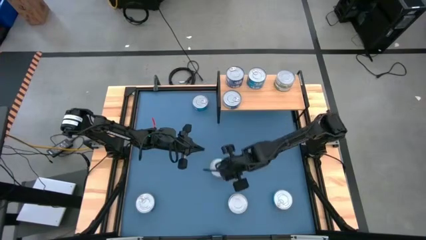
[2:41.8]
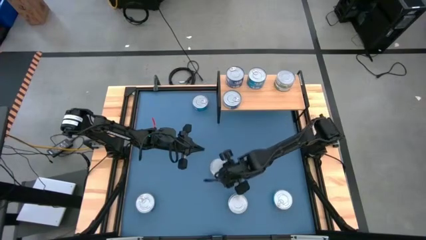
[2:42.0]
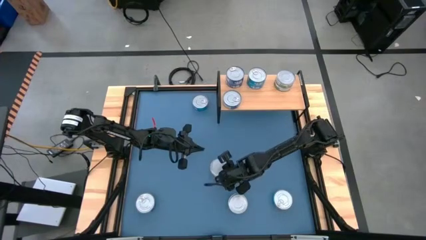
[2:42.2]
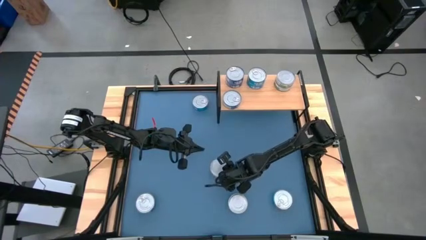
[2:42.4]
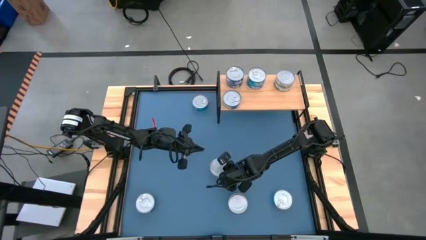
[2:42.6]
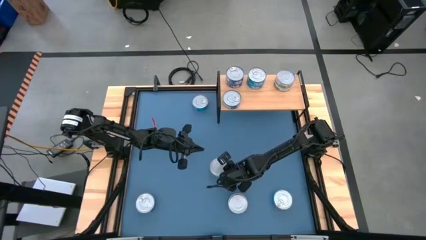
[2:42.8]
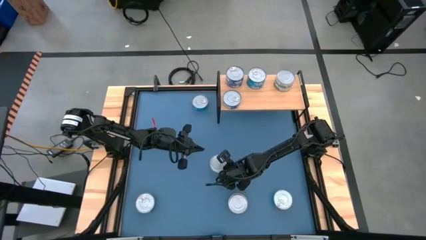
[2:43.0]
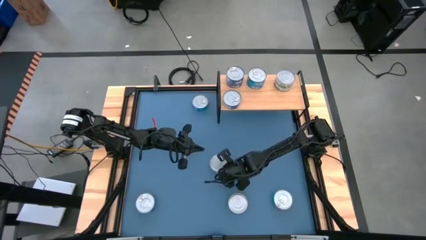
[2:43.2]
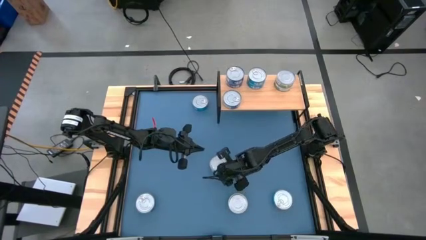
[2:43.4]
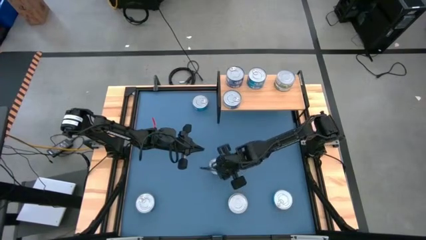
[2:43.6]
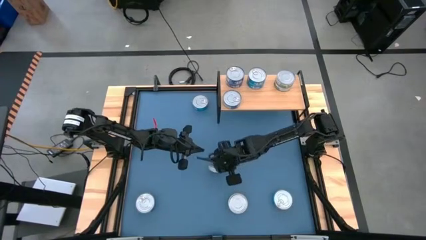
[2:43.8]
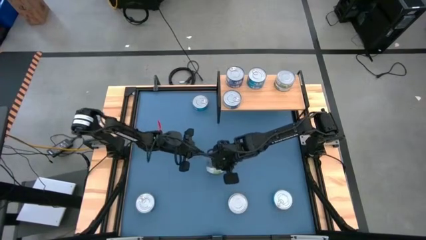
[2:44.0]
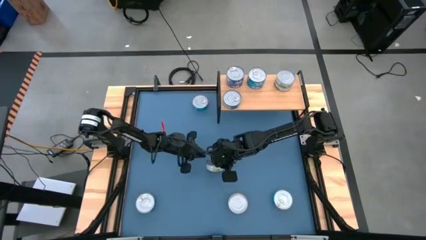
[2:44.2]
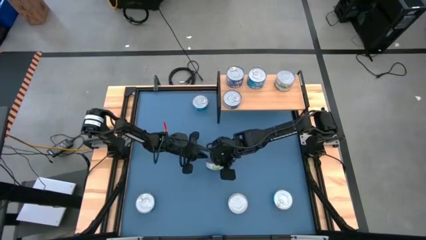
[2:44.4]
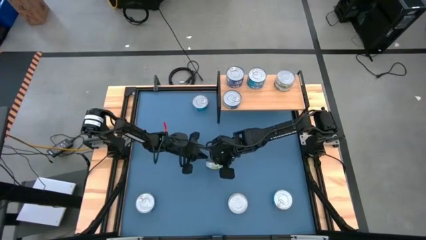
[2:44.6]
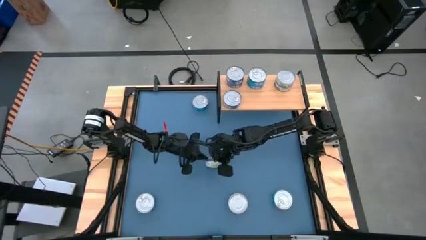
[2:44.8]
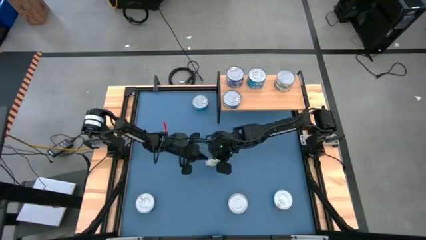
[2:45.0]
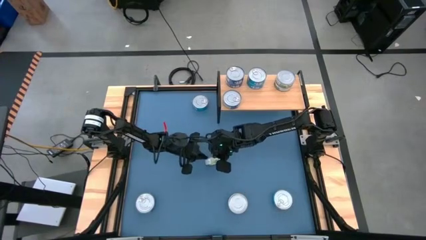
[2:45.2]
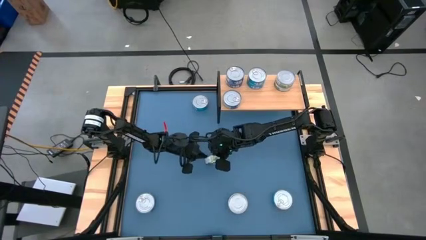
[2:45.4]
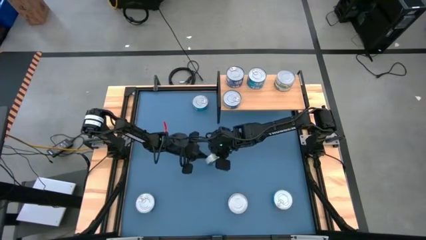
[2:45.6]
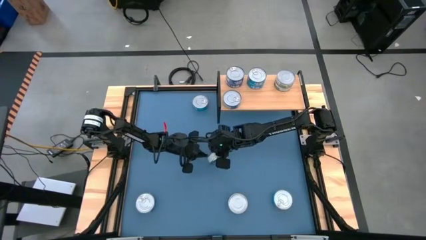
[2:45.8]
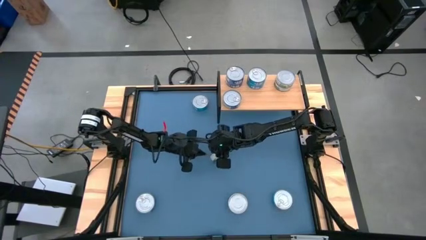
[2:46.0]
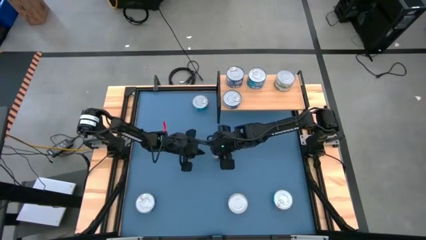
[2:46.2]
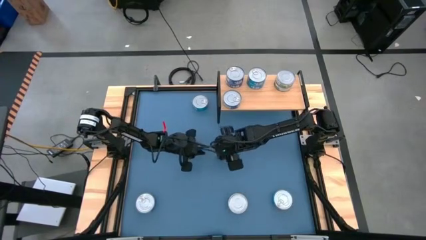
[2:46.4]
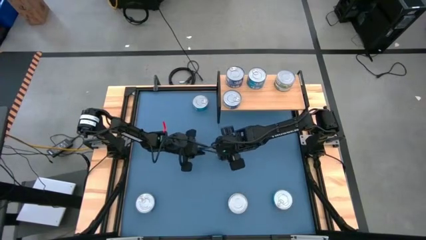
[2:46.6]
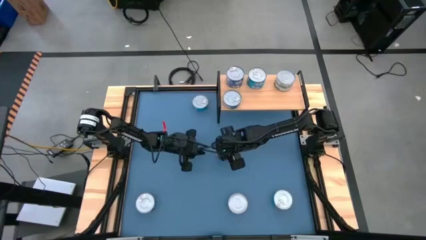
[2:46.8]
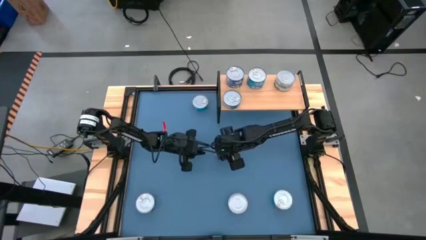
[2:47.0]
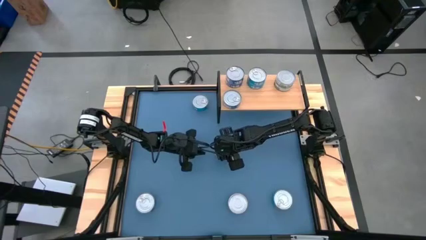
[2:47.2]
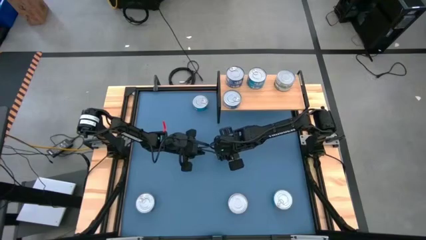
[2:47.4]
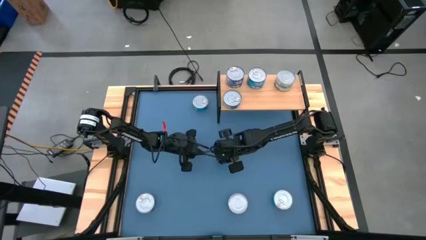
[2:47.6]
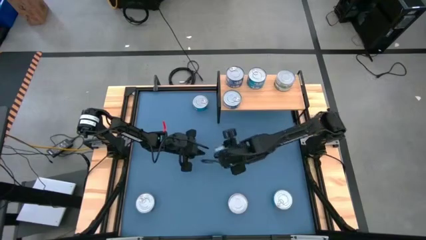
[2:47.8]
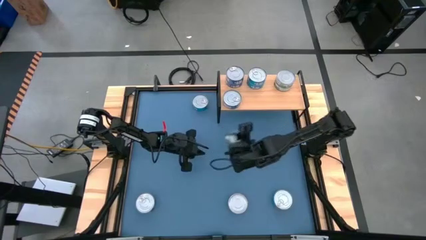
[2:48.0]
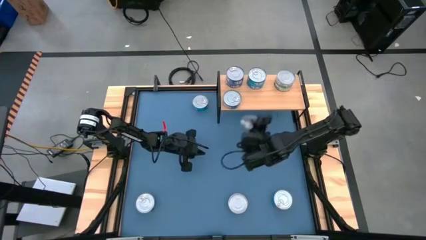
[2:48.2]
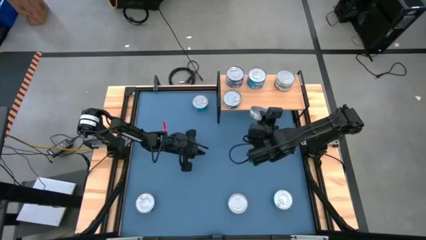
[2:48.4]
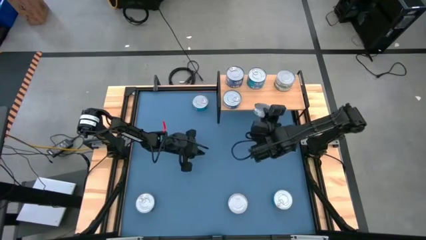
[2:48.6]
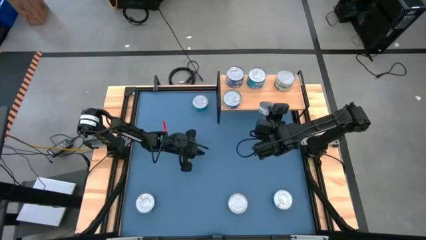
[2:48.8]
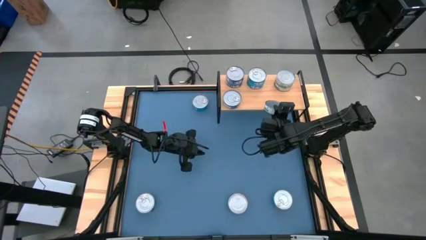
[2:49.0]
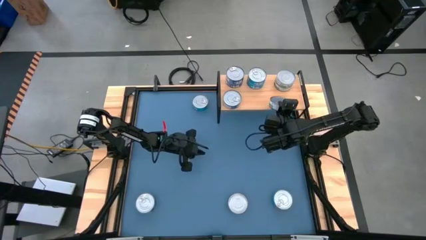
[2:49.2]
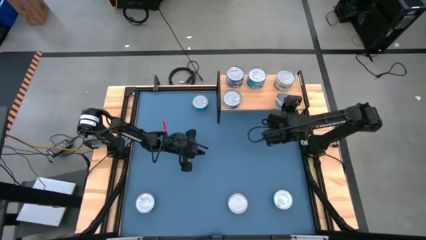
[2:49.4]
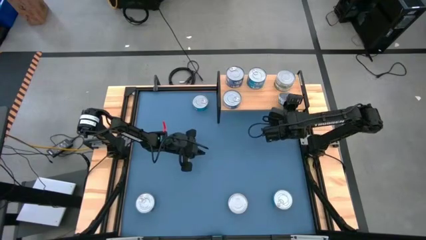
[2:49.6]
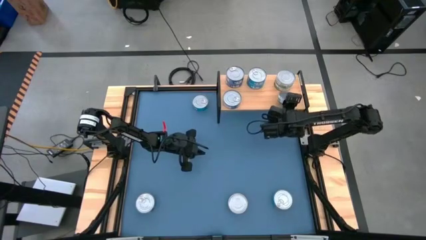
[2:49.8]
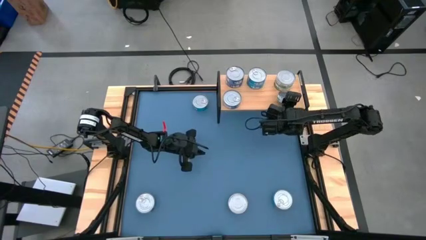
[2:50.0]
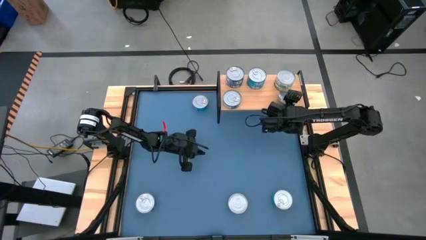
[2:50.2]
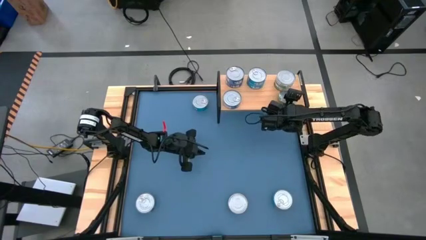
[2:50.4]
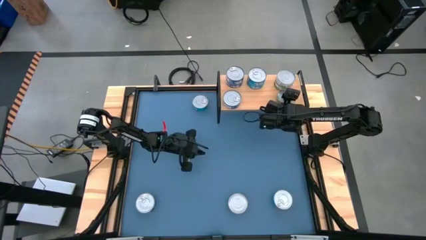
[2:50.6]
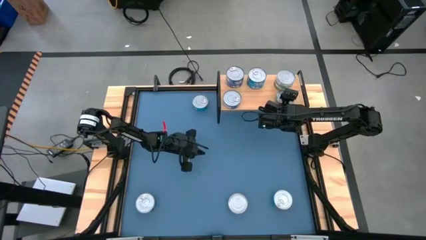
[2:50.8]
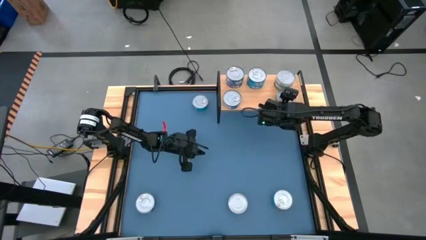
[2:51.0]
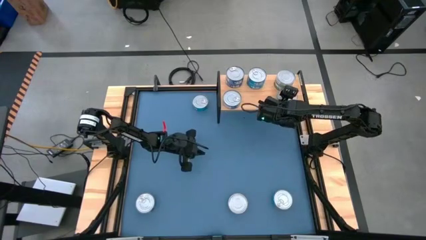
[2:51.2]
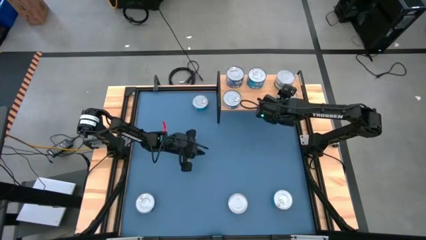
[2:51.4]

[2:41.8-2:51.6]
Task: Stack canned seafood by type on shelf
Put the center green tuna can on the shelf aligned with the other green tuna cans on the shelf

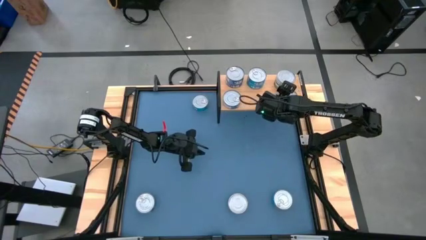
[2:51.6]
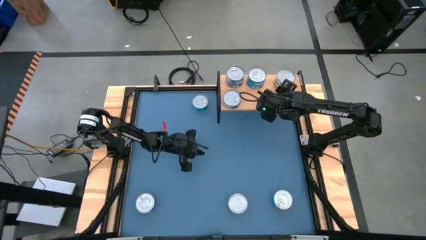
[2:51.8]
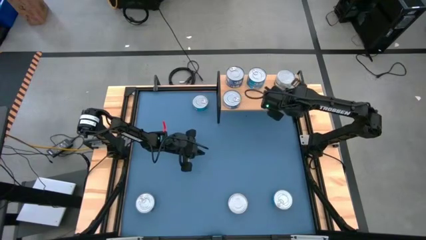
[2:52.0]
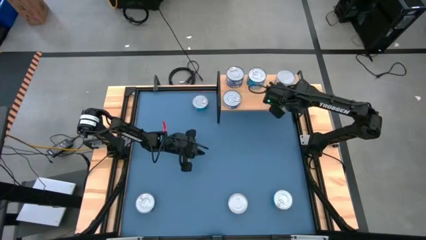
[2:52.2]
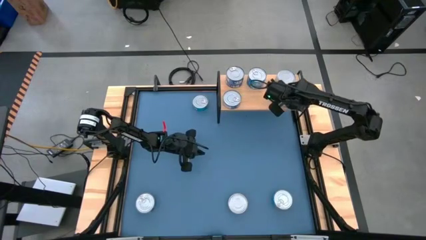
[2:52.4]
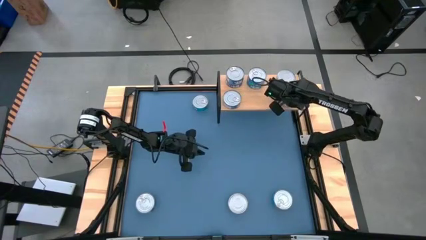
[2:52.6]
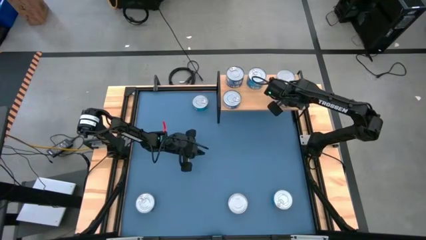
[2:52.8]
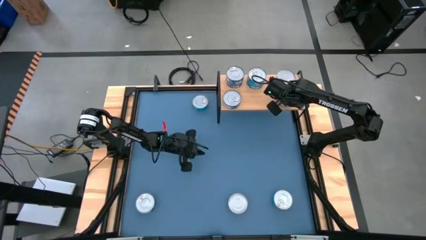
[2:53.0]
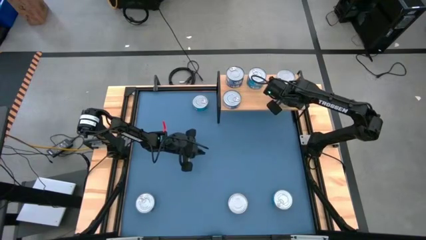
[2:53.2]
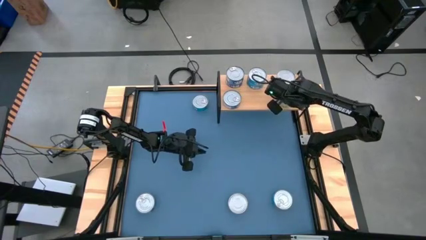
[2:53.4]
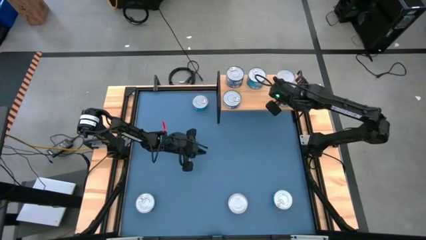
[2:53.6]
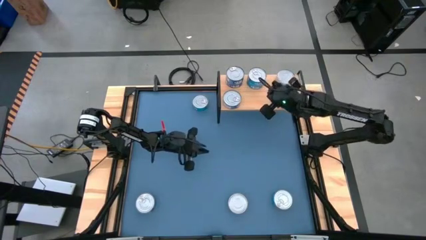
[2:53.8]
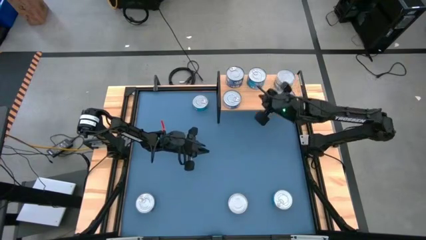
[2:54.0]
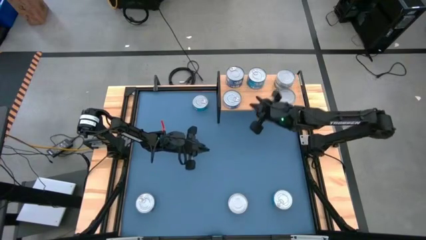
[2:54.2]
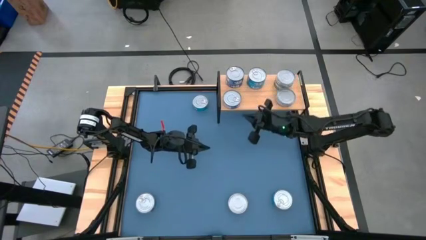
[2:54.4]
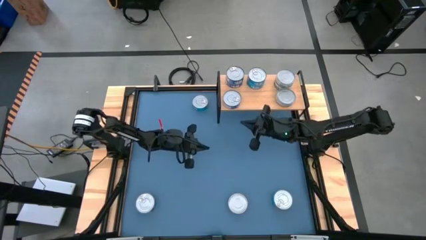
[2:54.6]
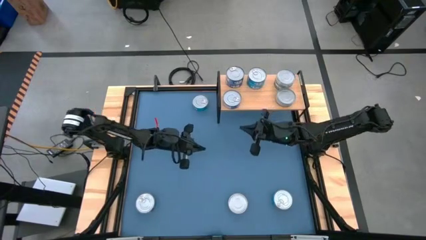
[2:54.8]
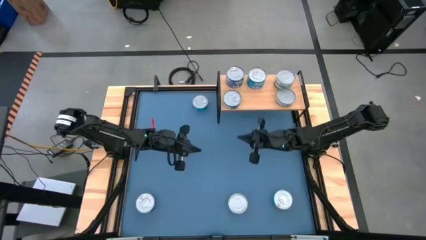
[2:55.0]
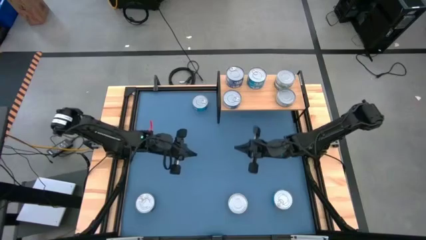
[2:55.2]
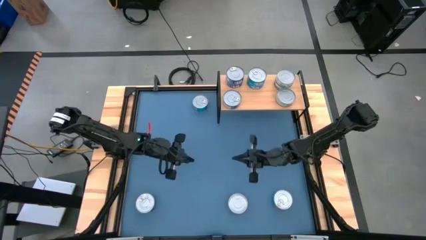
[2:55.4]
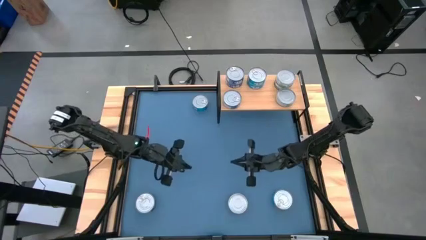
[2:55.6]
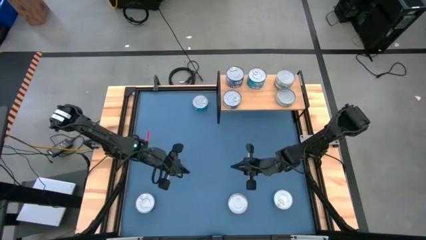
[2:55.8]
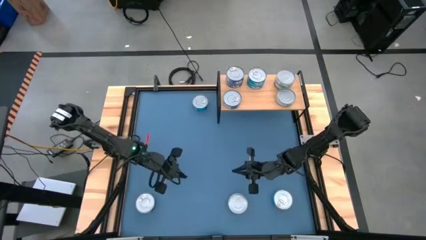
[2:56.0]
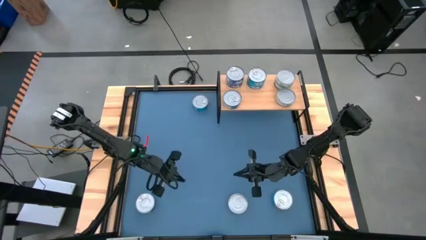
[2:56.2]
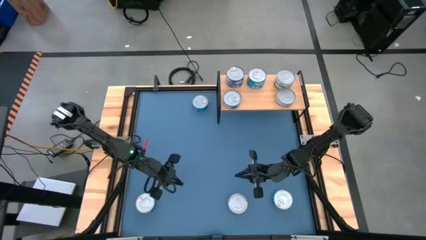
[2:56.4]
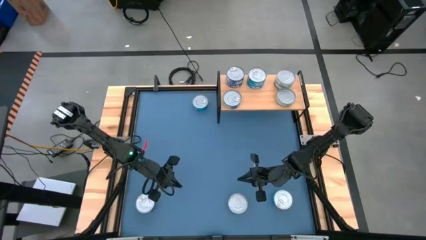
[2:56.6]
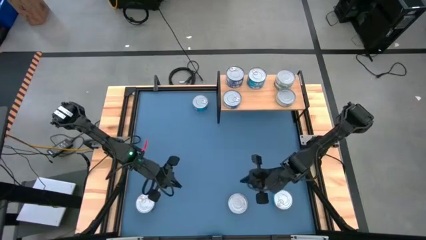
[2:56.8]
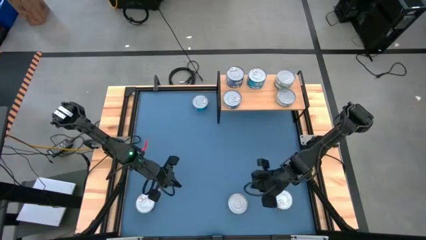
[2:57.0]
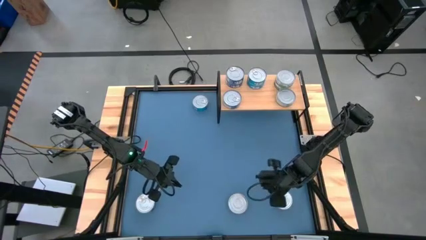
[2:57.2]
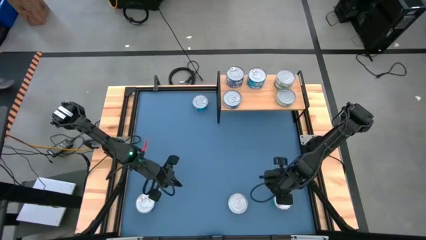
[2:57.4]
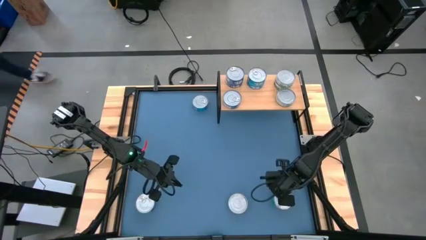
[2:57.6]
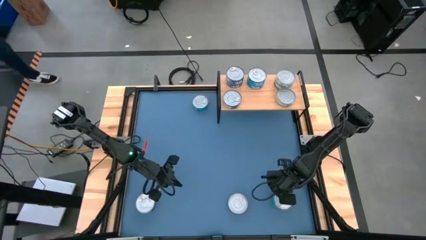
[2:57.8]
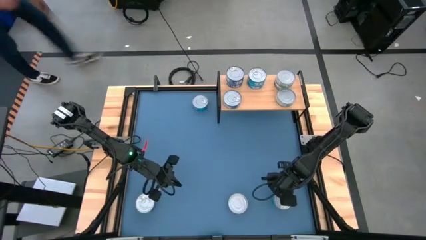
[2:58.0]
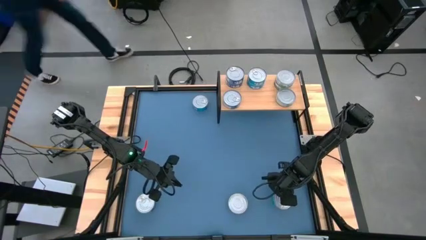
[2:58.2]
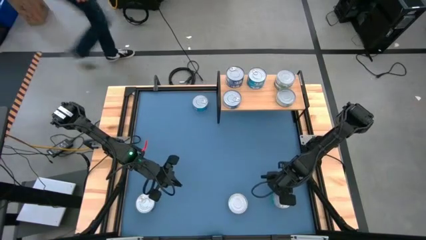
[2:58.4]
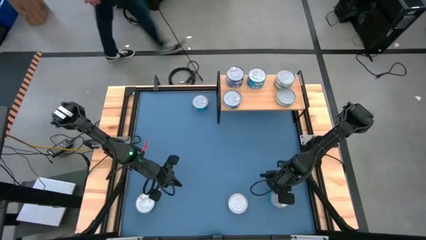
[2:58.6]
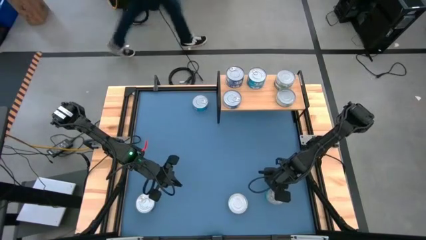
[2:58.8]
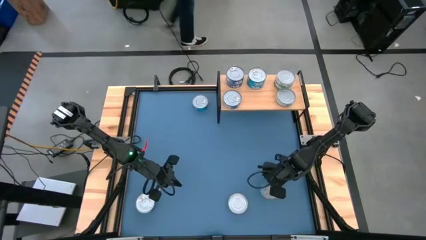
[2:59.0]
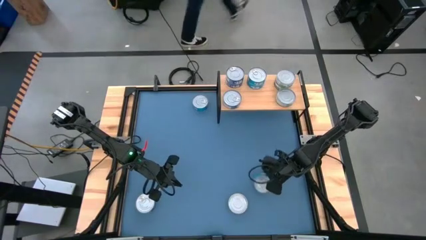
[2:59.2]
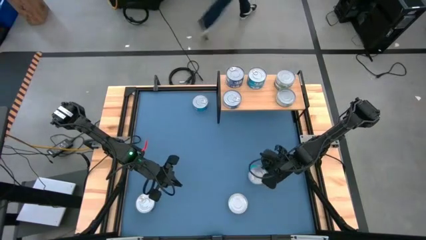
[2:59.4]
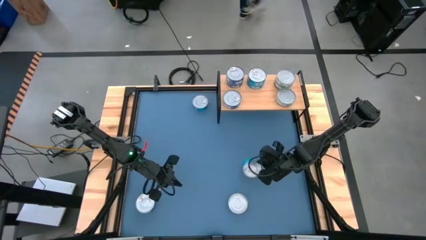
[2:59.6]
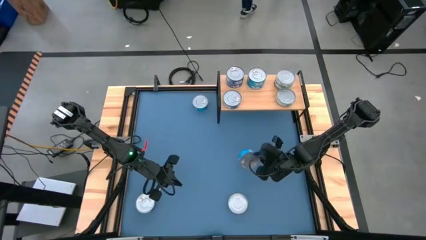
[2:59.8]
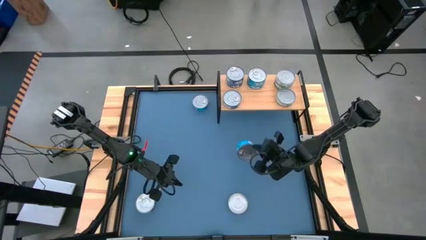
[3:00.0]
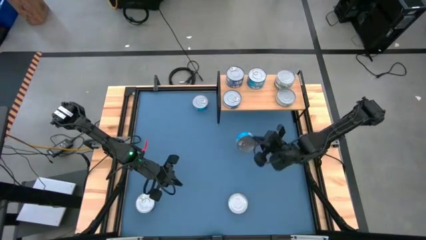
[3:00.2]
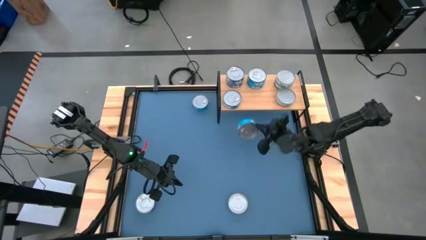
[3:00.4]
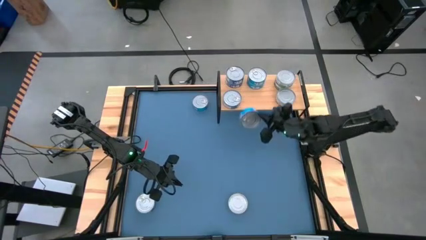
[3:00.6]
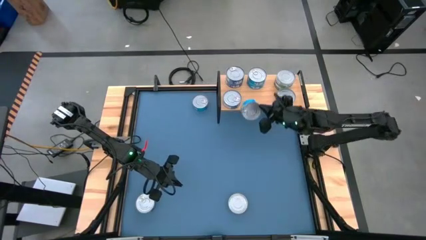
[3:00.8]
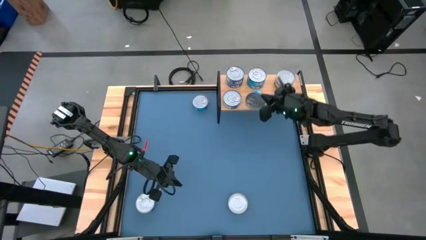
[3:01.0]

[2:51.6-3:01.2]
Put the bottom light blue tuna can on the shelf aligned with the other light blue tuna cans on the shelf
